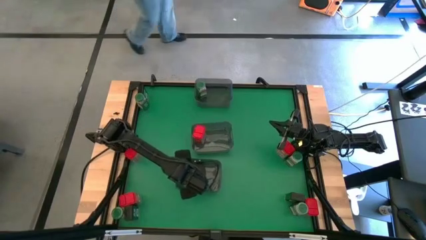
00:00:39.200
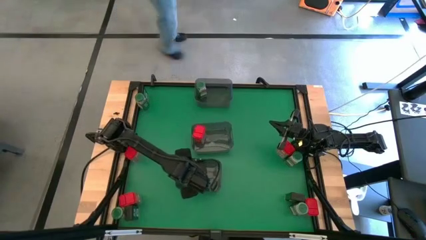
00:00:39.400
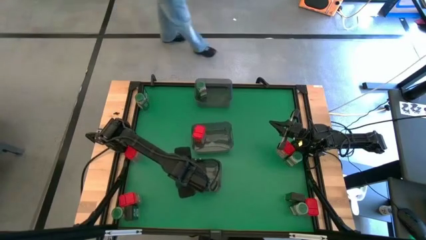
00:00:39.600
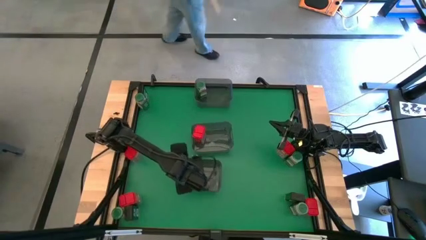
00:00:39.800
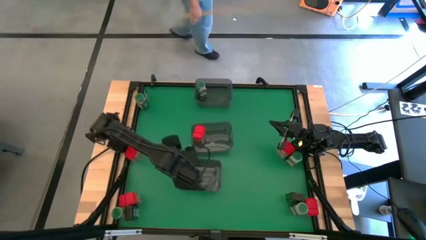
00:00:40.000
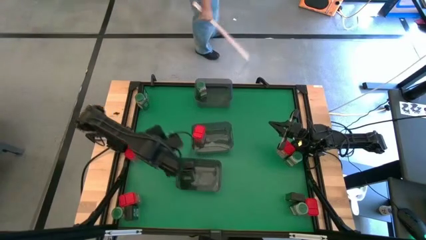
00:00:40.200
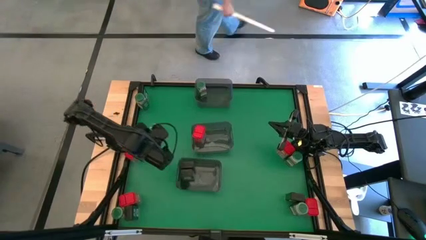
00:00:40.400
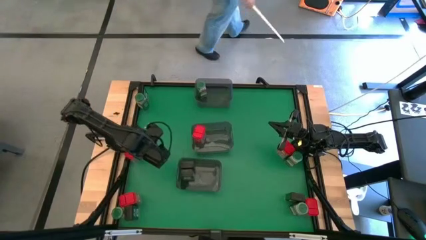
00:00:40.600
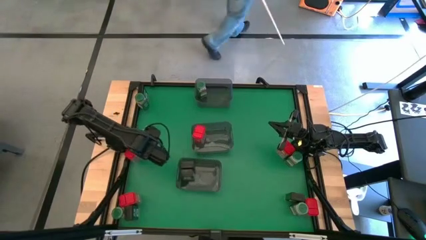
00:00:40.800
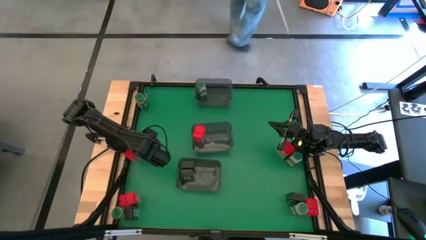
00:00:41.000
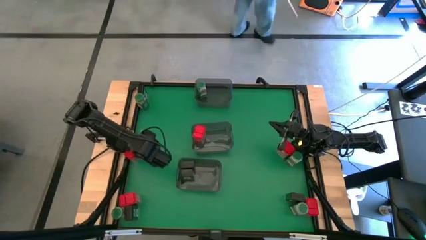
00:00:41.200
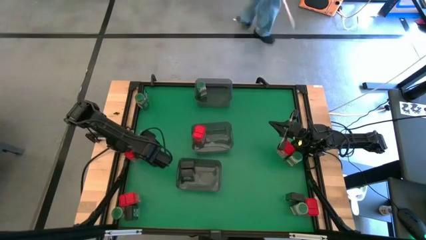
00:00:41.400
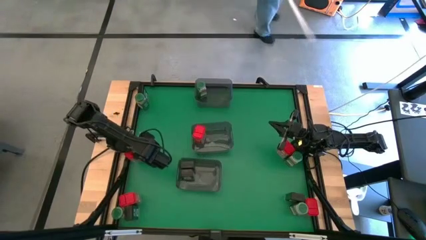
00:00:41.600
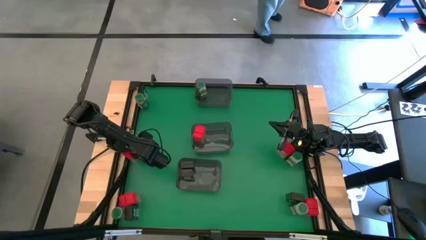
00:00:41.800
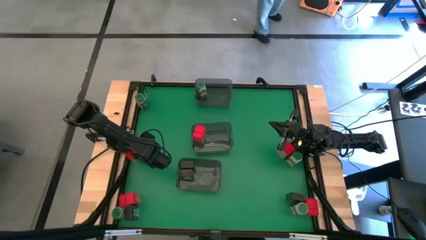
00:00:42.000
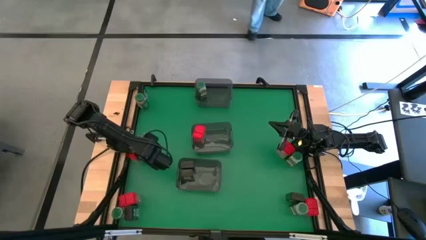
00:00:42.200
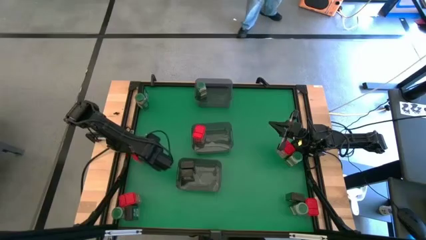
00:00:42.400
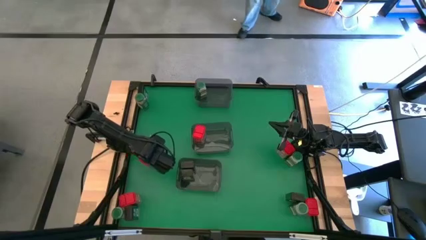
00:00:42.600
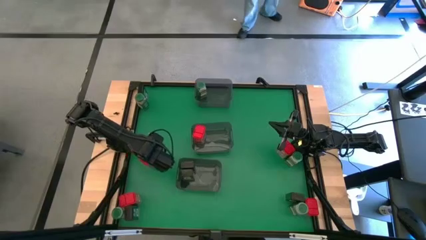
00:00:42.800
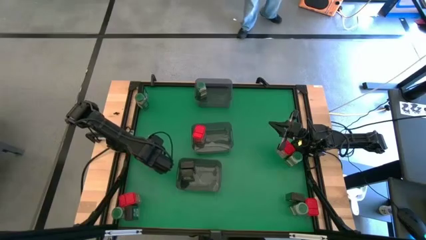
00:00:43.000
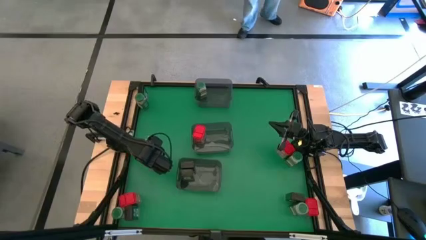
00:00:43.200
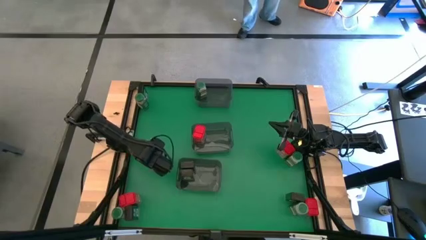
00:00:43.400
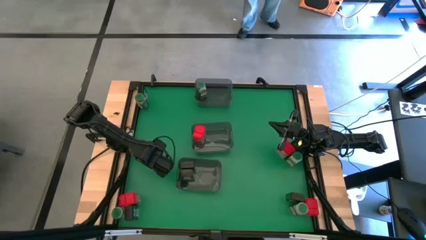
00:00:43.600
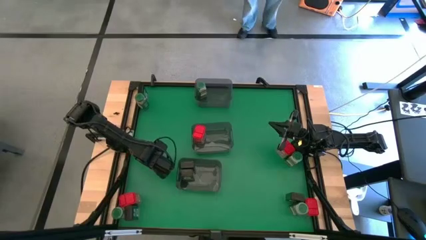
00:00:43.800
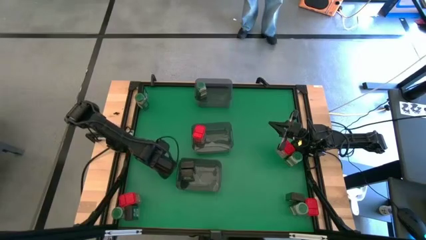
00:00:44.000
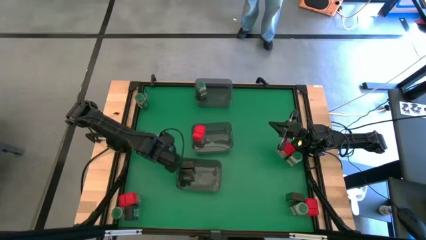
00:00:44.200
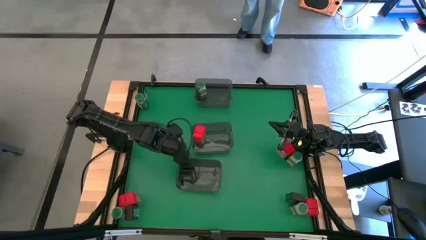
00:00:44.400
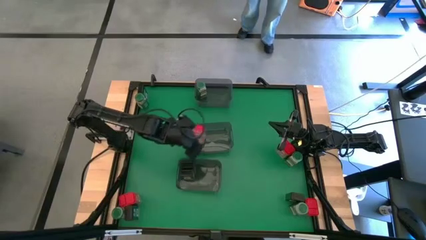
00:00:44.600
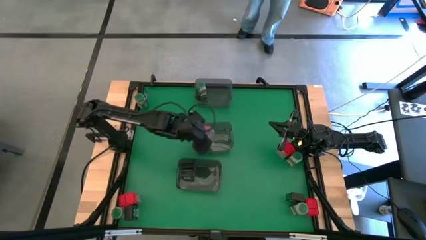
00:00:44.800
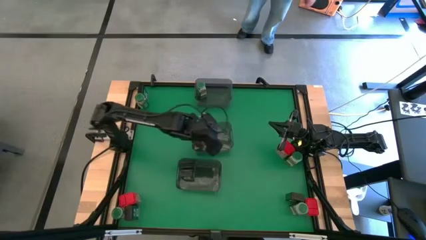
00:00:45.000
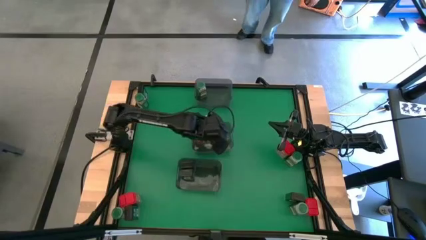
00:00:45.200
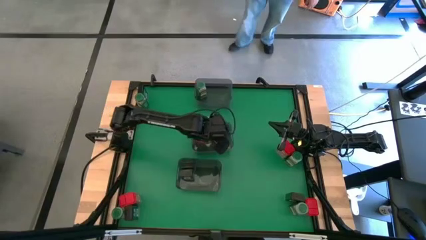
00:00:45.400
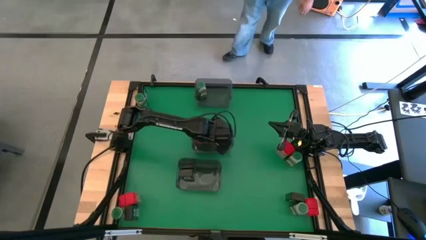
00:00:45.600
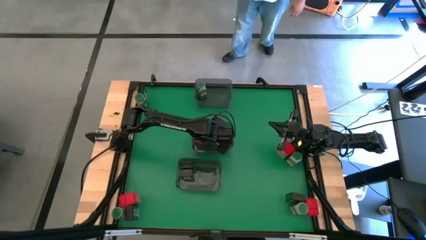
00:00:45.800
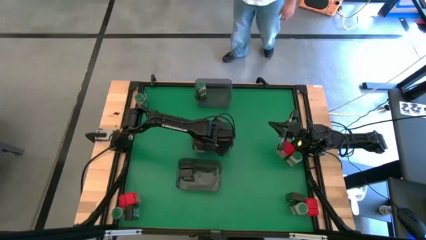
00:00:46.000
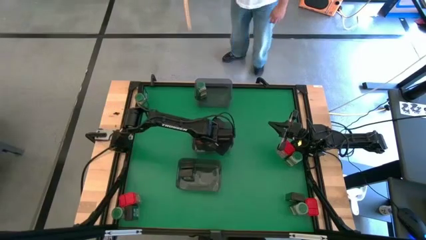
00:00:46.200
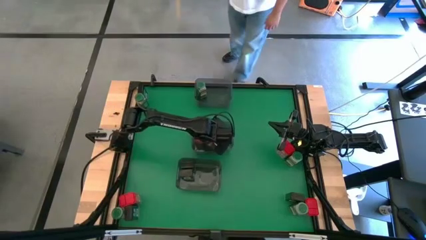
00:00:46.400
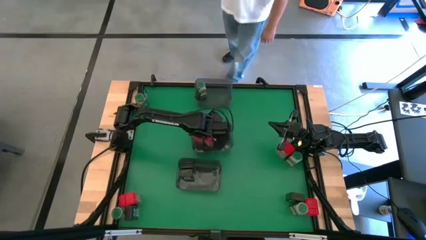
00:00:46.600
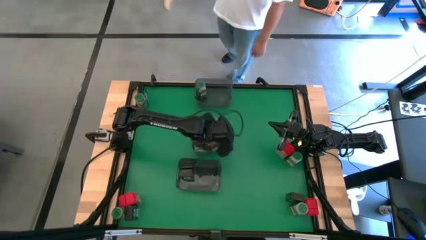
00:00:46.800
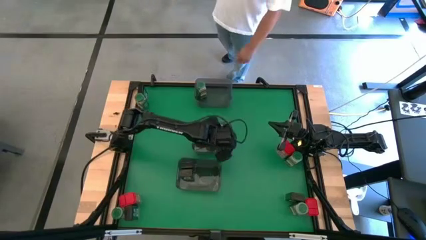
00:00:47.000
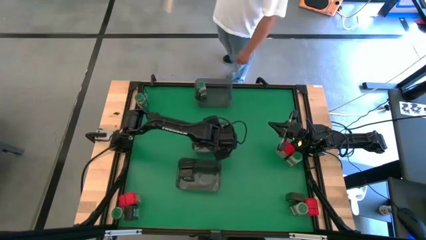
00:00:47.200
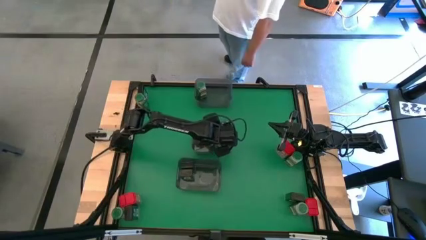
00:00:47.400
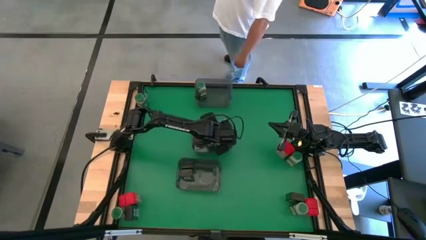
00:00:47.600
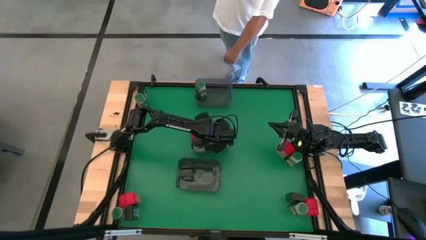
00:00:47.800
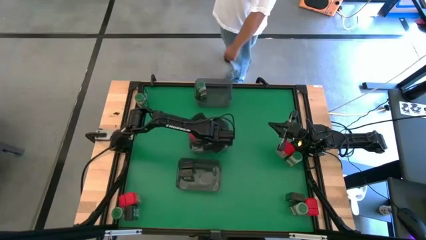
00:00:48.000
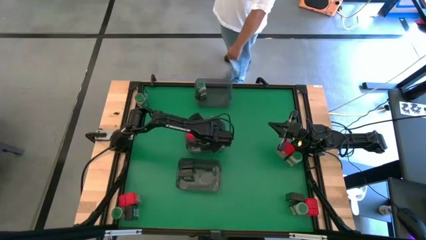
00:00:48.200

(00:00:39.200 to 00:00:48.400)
Task: Sort spices by type
Put the red seasoning can into the middle gray bin

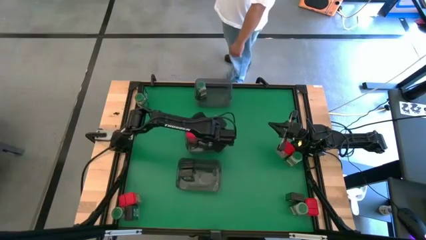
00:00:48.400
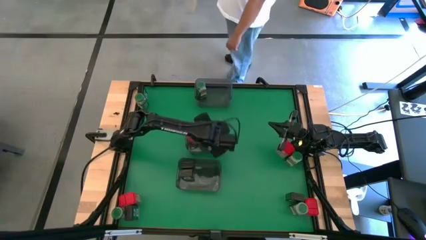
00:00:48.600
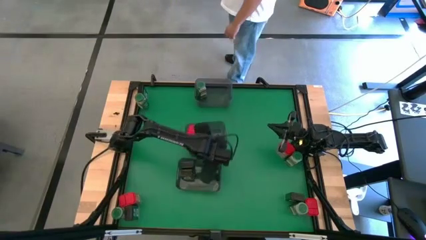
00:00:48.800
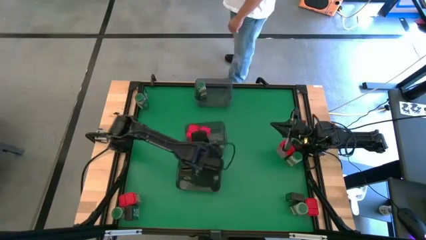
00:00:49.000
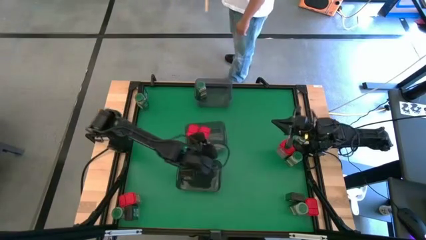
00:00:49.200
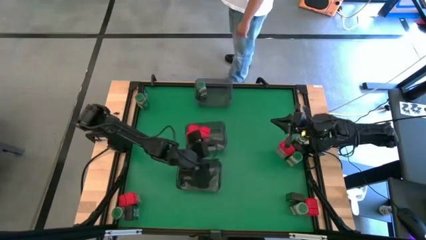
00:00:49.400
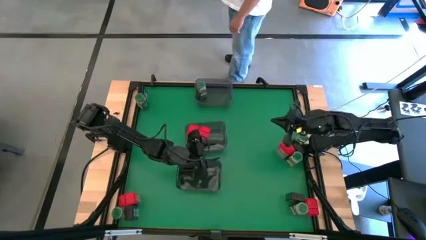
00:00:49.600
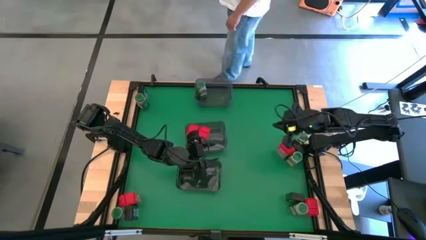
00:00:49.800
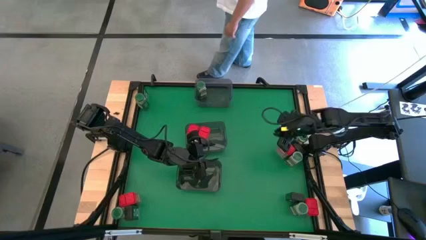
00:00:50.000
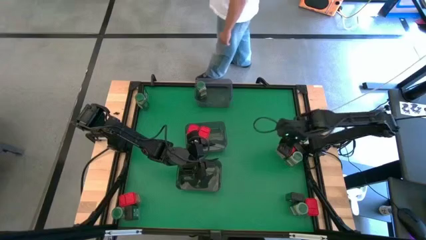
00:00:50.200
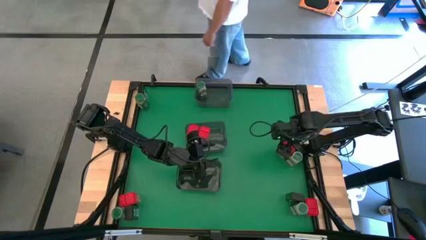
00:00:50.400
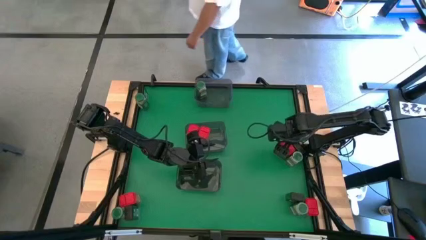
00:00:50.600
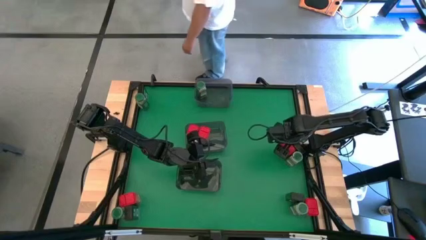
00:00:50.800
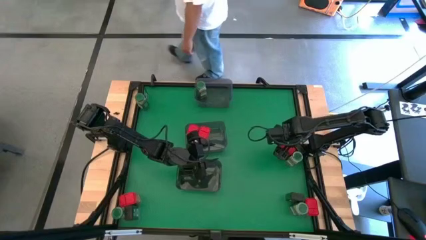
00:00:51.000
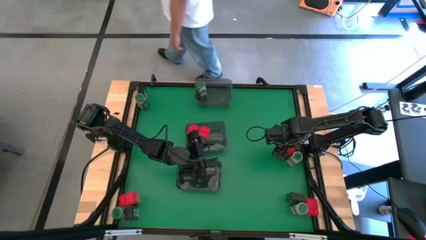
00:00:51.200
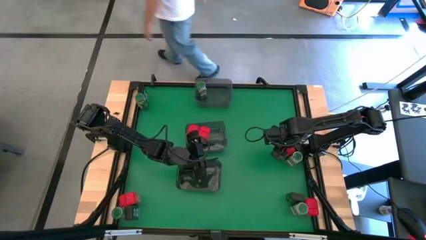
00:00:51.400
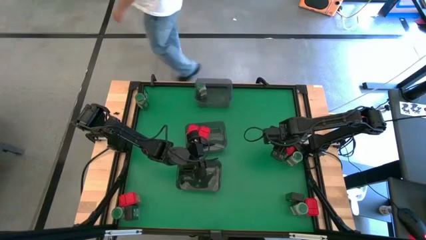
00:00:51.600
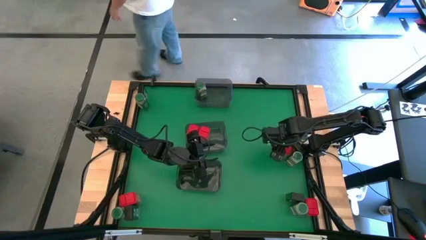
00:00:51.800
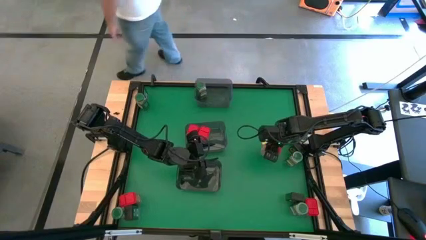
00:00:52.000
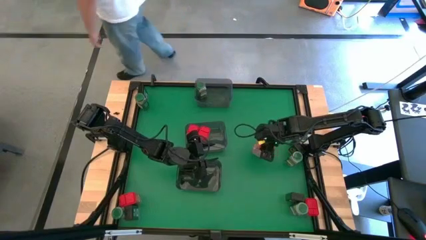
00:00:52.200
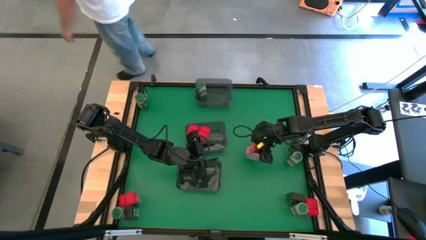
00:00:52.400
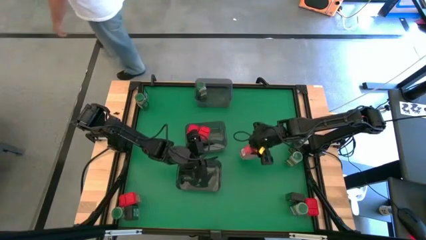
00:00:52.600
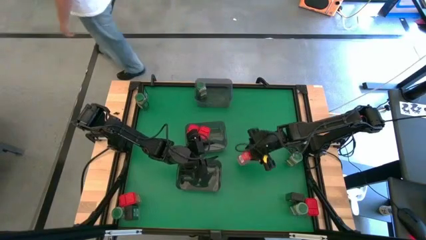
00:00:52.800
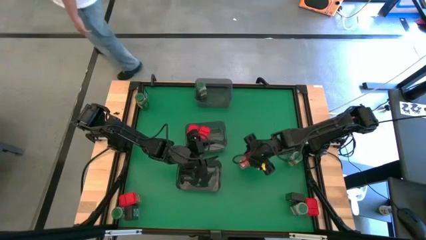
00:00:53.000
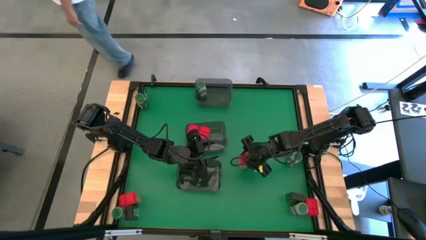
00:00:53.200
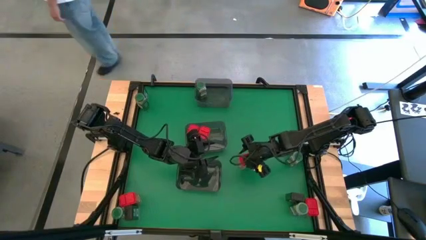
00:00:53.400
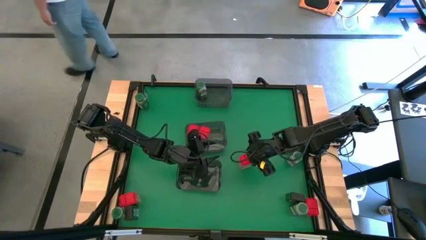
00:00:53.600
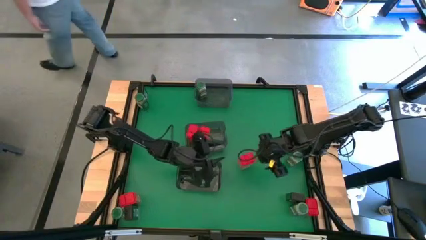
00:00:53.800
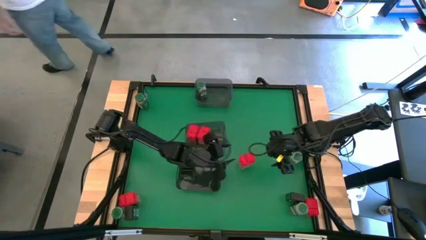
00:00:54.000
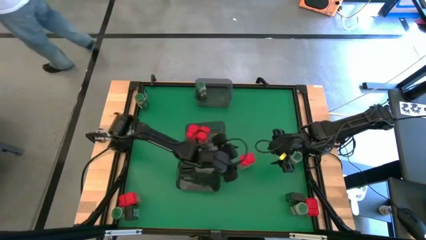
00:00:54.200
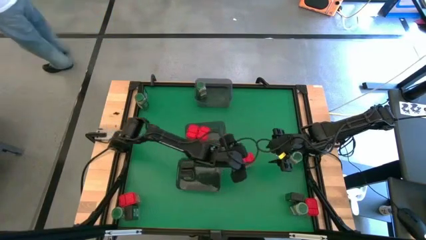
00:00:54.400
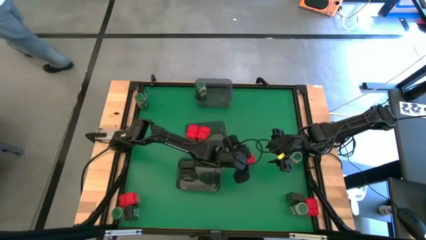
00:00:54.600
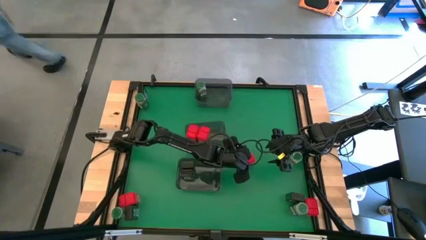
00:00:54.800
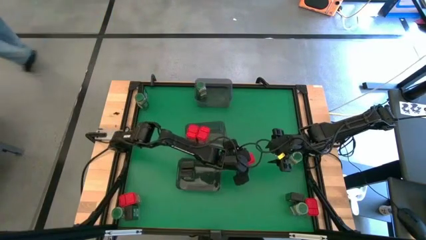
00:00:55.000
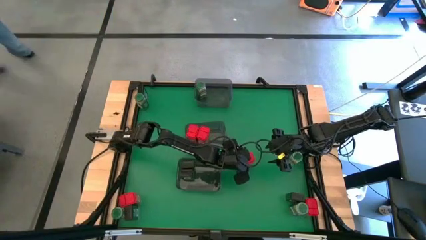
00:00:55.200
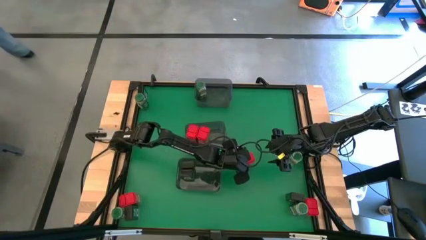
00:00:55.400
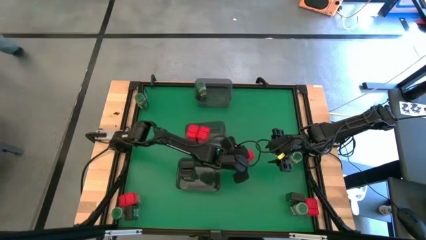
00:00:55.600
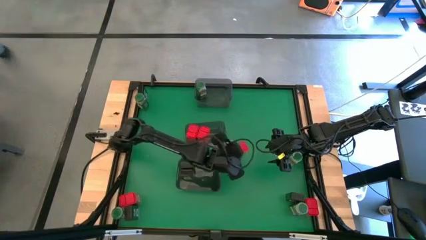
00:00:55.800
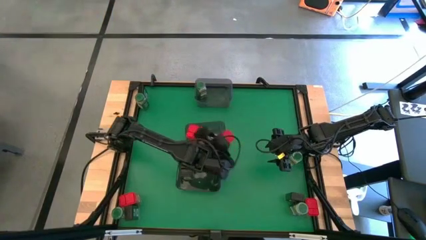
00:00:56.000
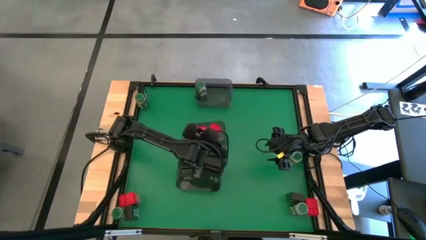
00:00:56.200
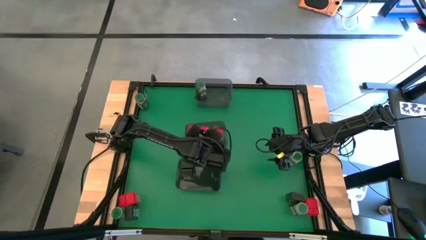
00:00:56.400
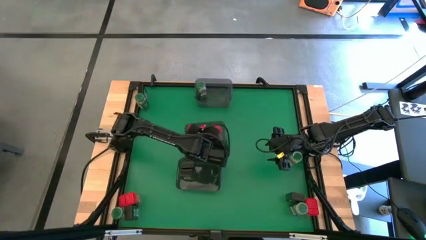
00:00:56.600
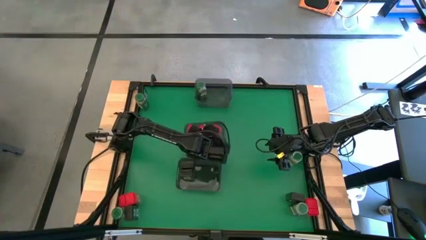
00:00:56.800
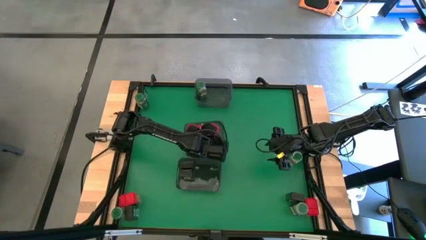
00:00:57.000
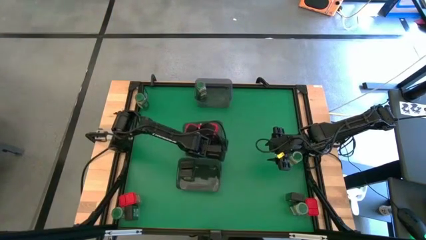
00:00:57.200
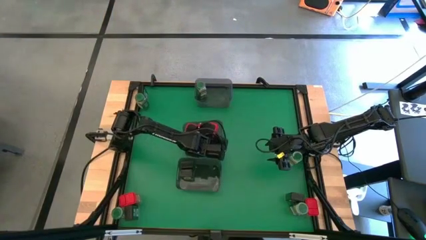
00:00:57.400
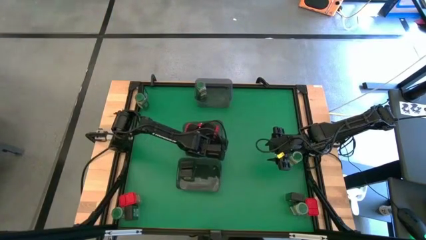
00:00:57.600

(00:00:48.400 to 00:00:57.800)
Put the red seasoning can into the middle gray bin
